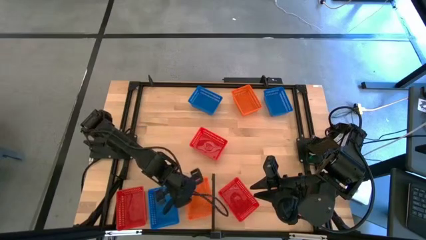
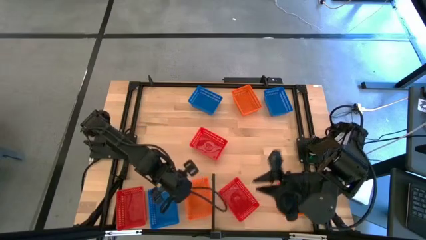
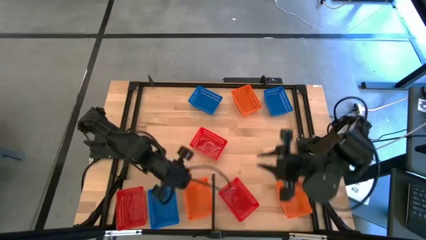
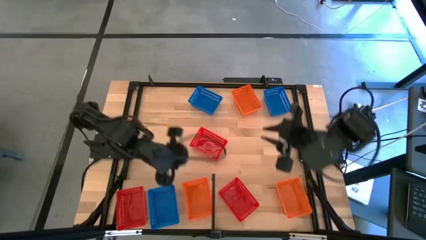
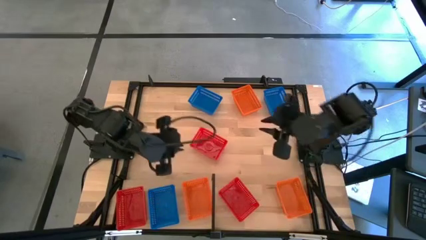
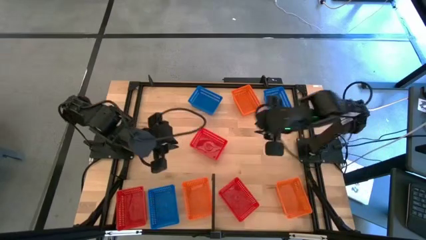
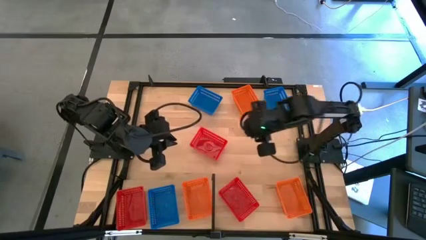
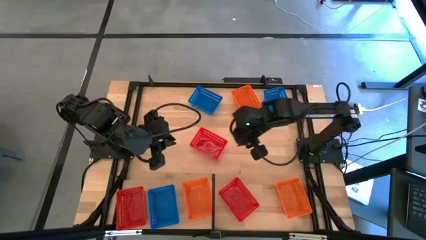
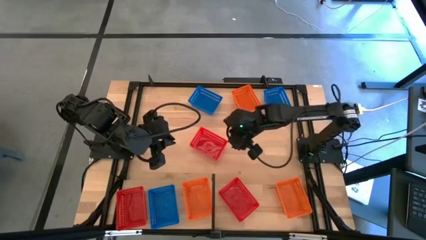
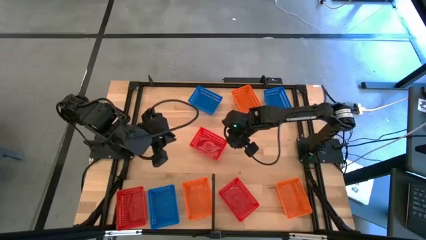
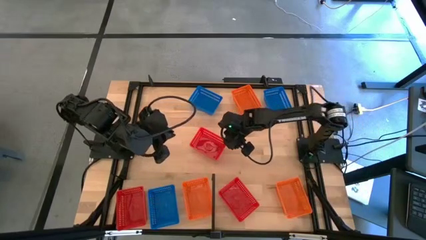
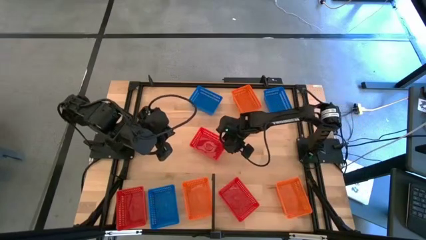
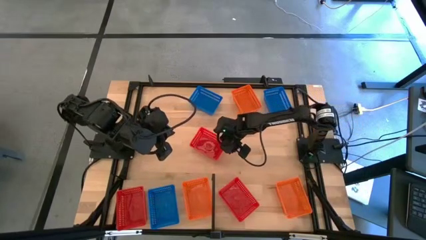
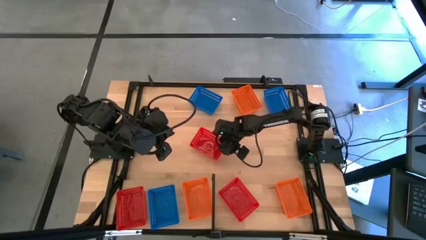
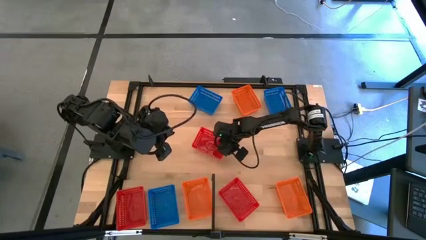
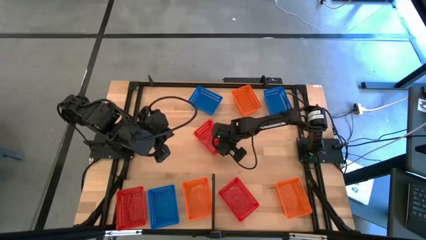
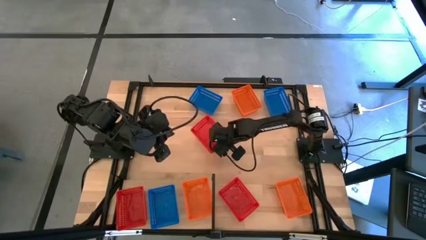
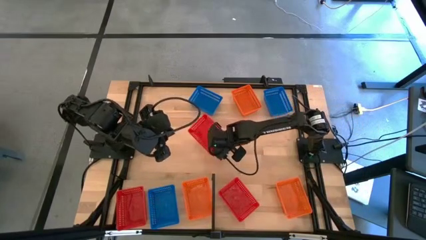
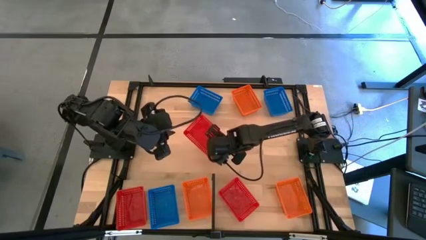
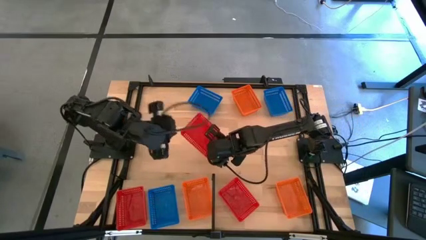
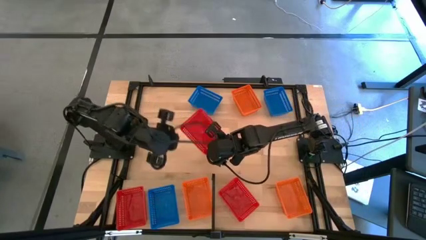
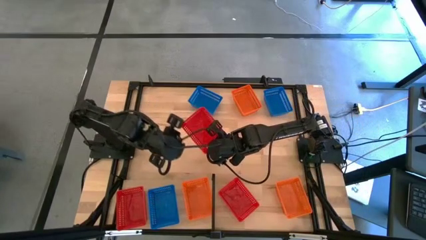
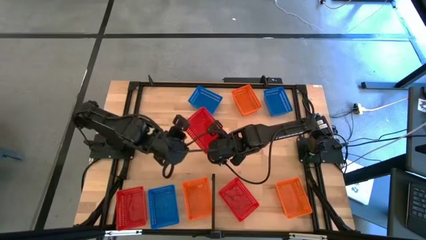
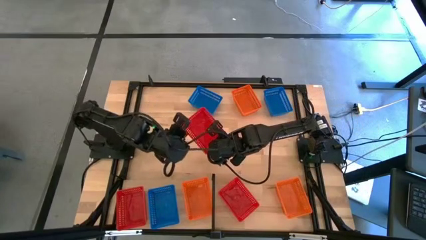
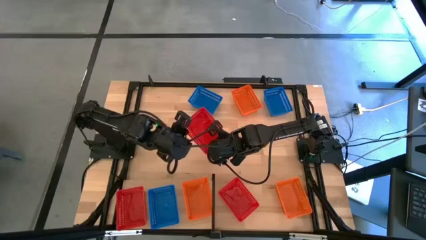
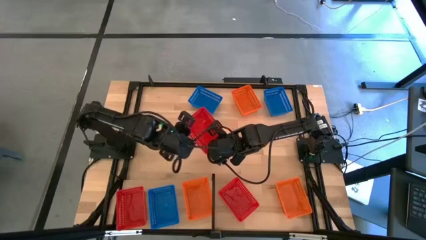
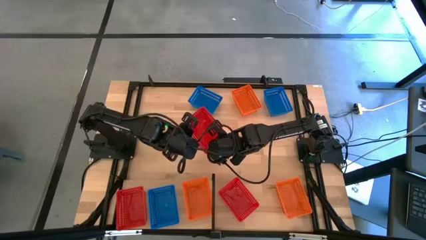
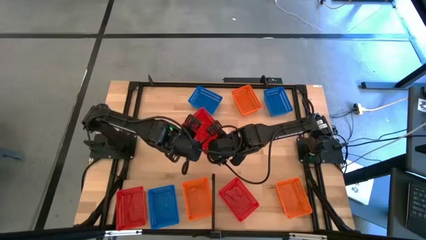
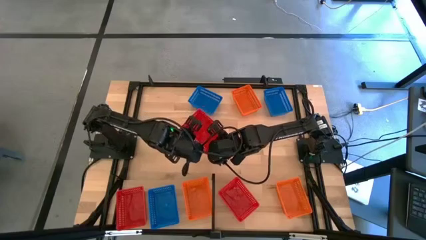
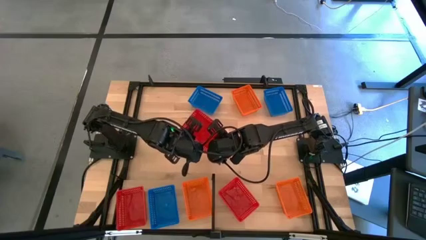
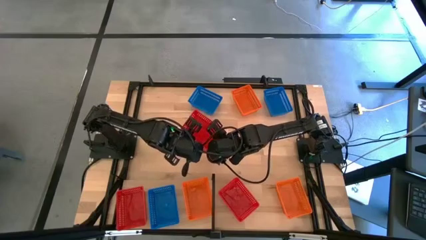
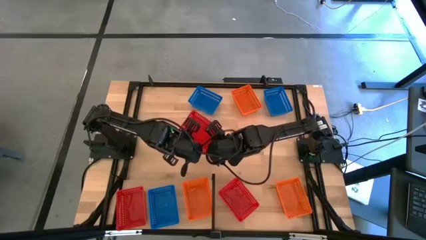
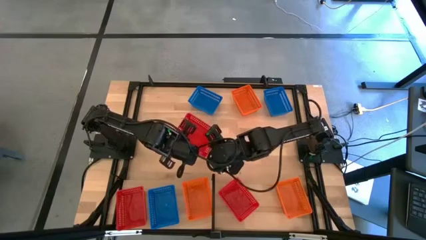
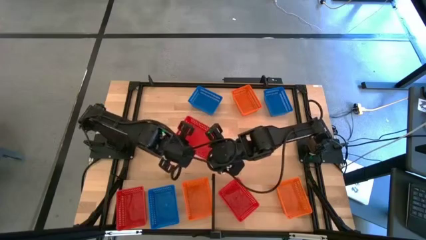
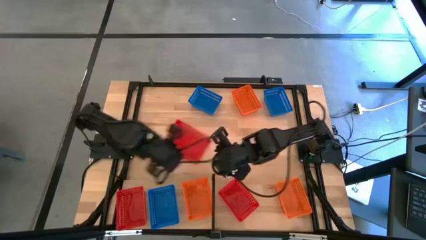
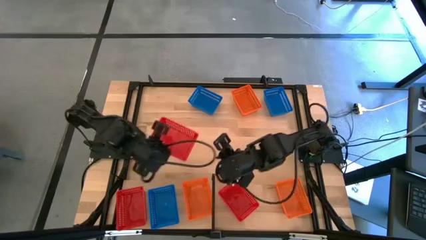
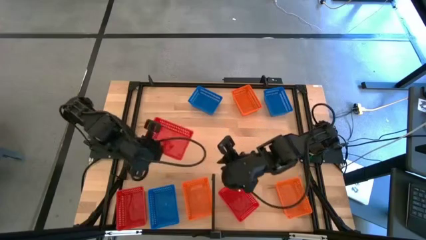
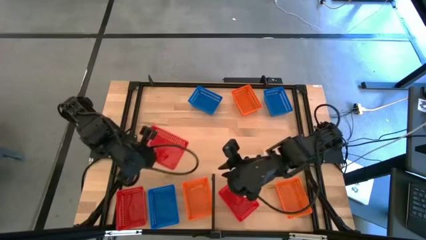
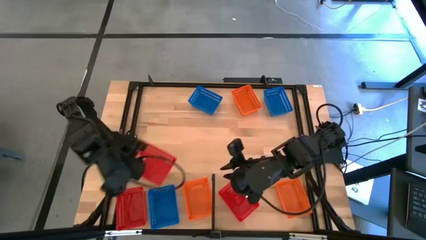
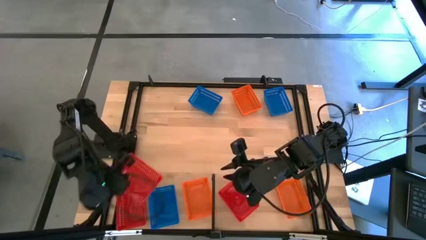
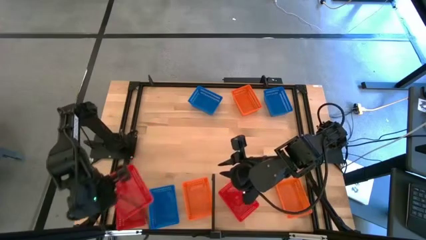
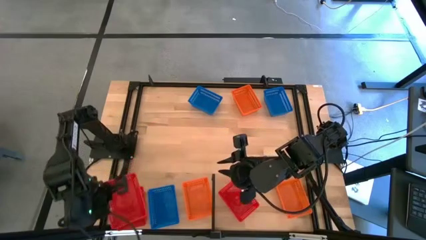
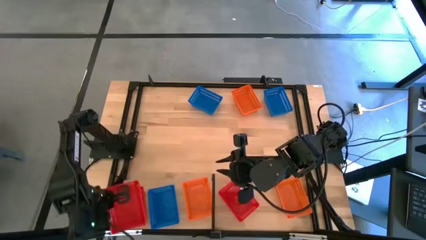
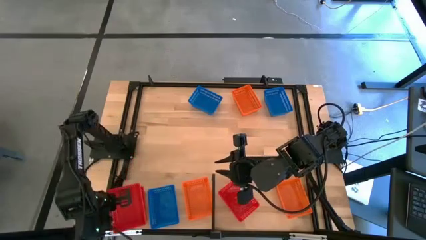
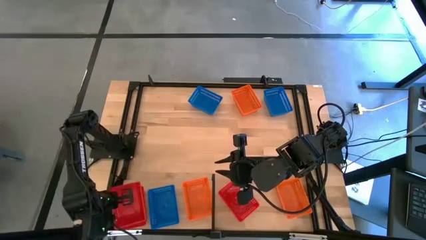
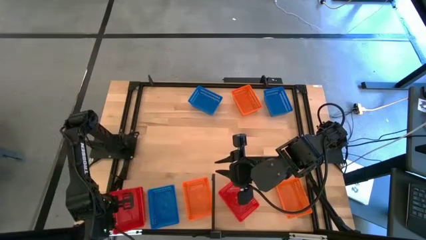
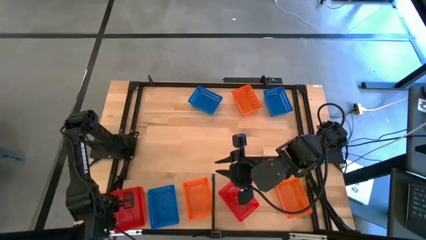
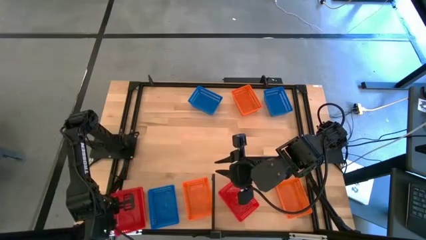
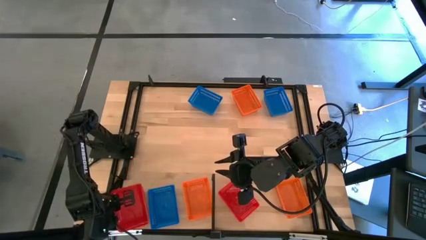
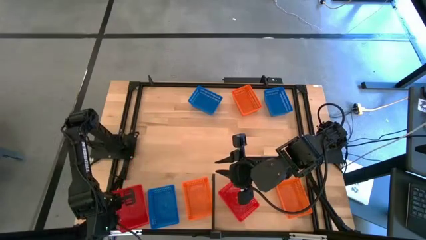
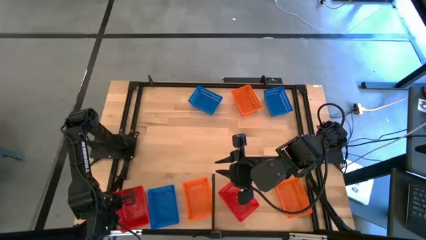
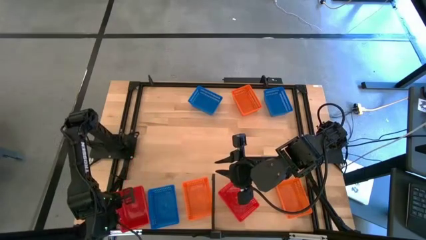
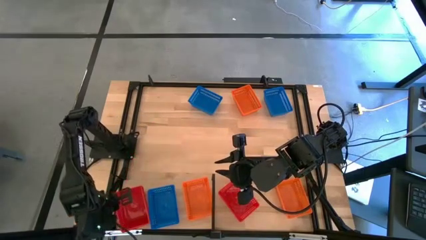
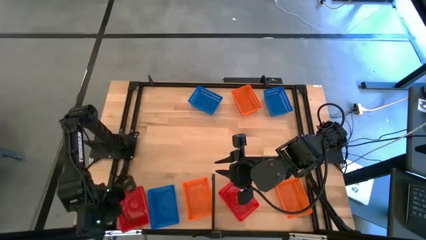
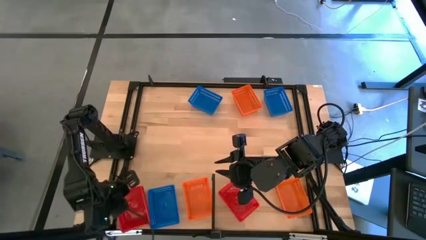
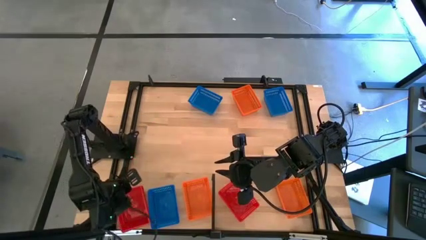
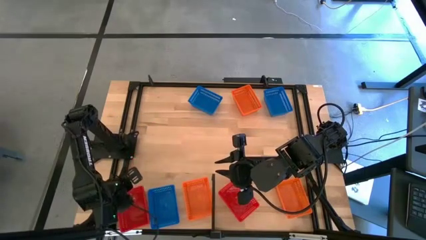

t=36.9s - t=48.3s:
Task: Stack baskets on shelf by color
Stack the top red bin on top of the red bin on the shelf

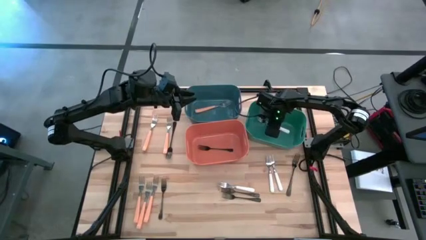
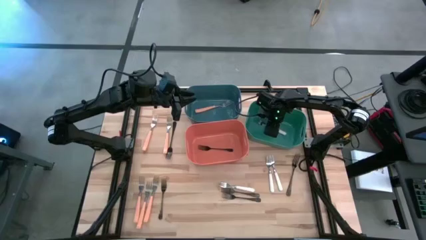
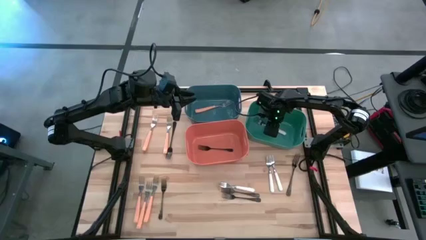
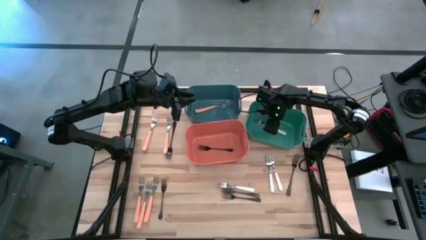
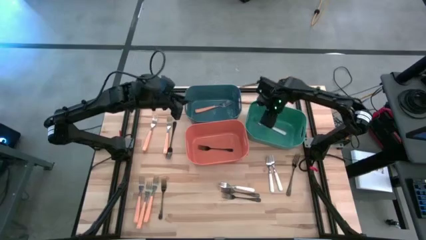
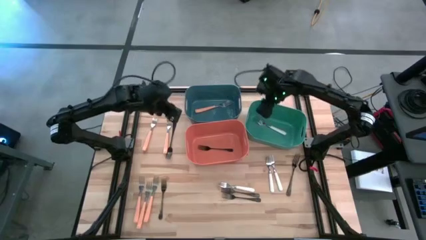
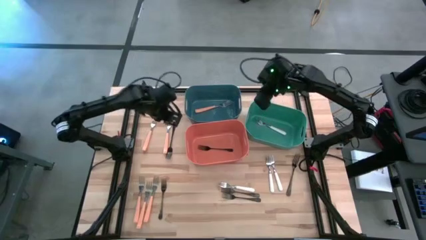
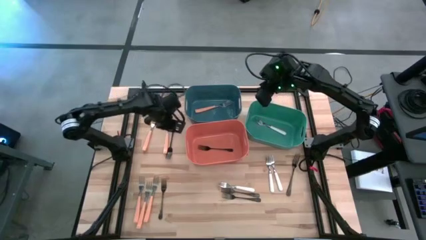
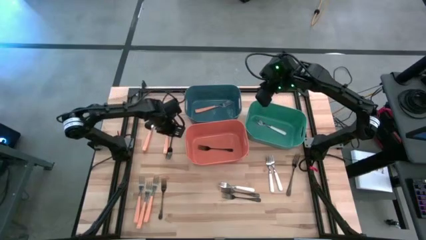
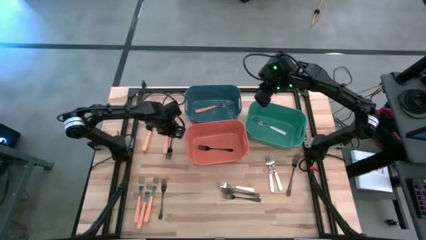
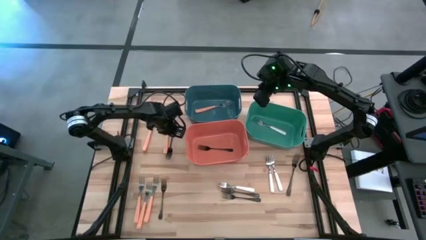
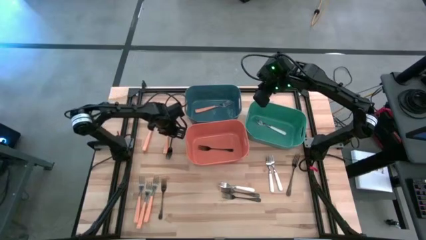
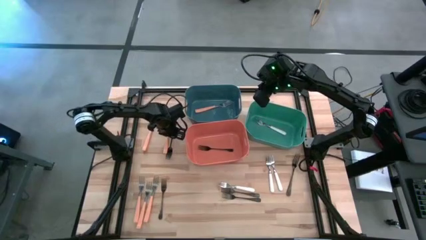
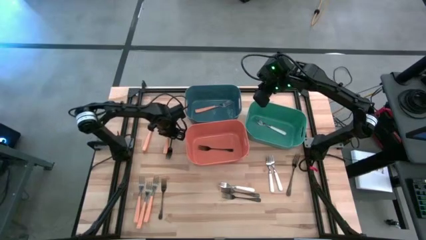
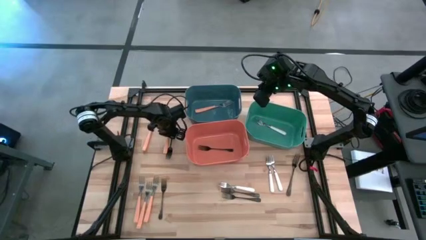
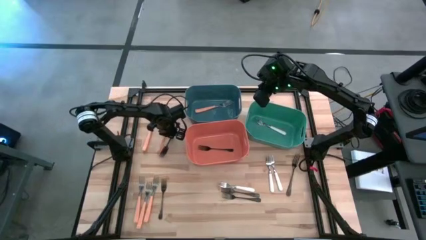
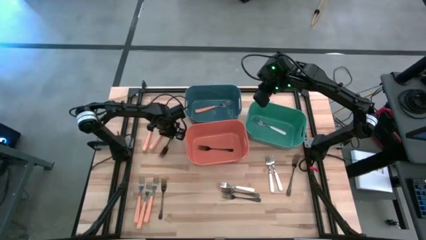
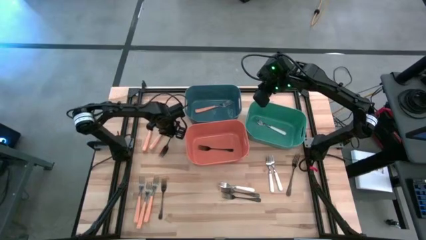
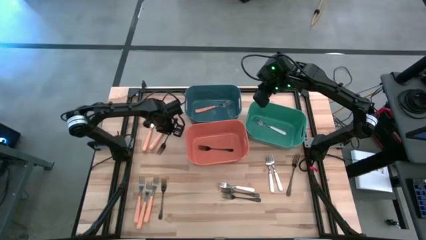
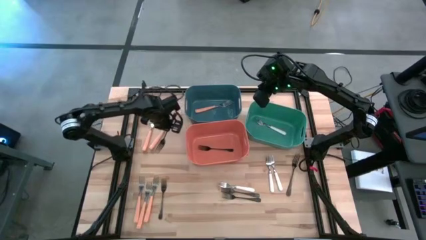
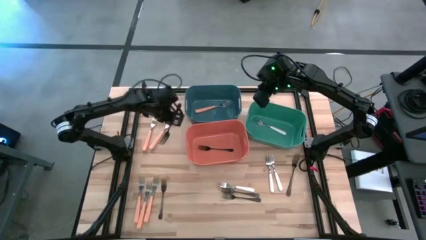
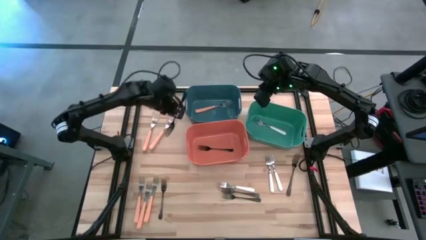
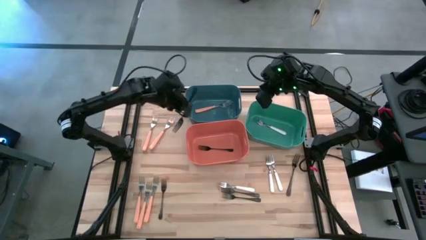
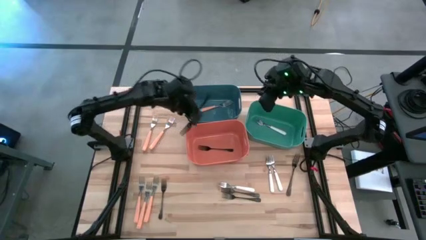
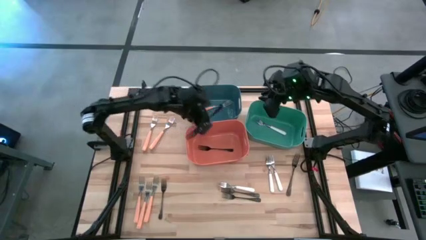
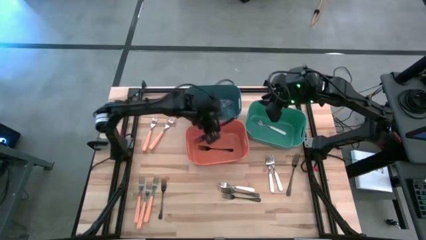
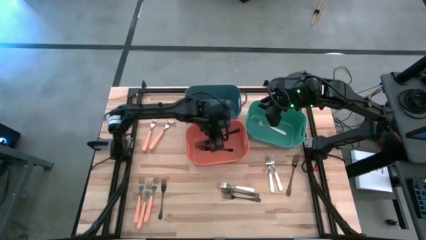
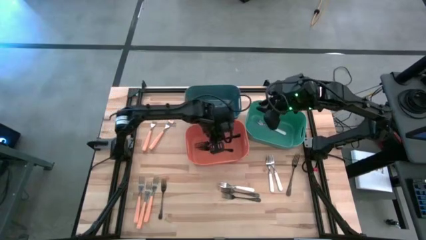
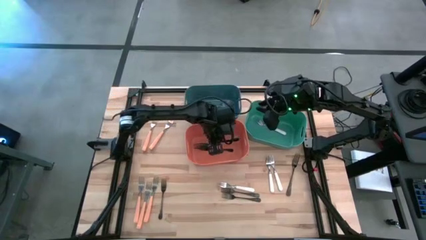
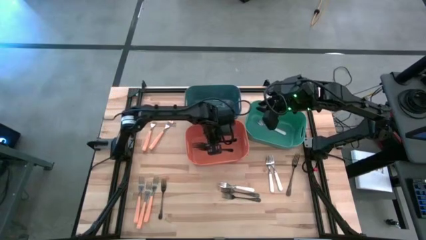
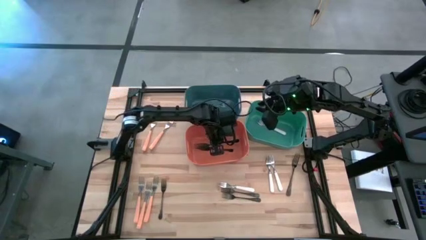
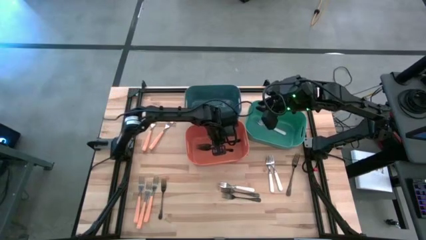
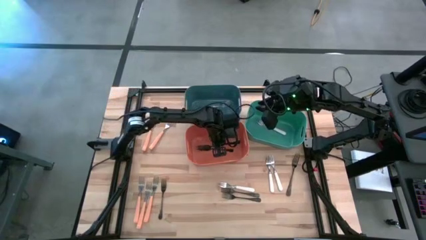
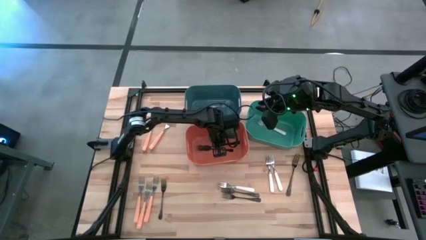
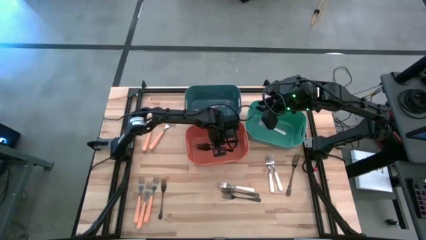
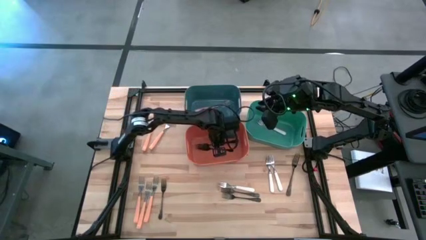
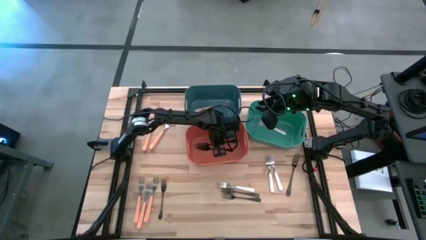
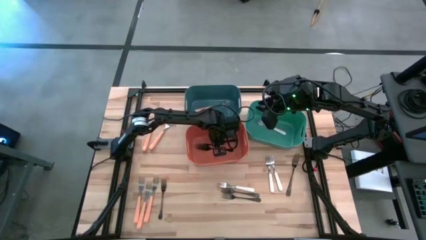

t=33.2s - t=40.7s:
Task: Sort silverware by color (type)
Put the black fork into the orange bin
